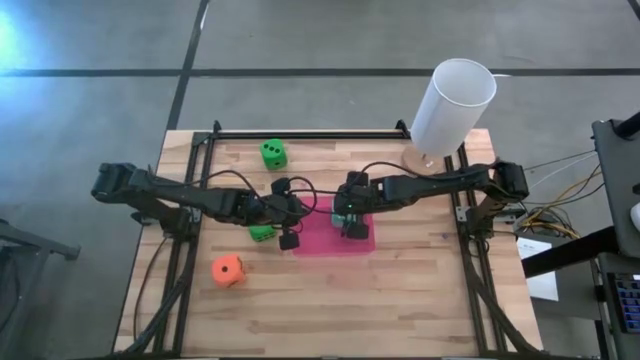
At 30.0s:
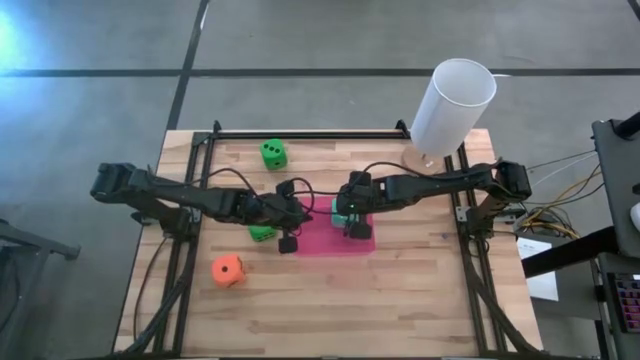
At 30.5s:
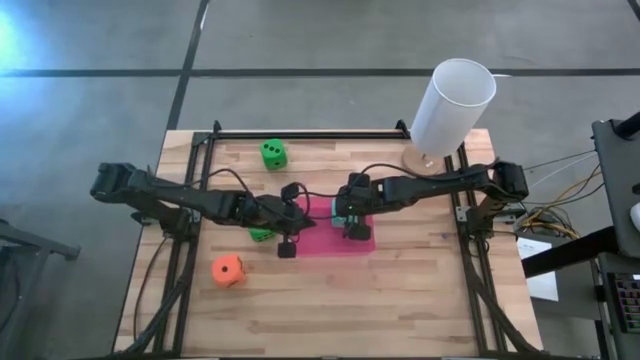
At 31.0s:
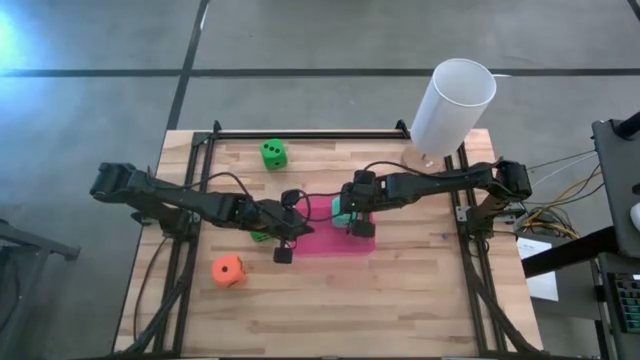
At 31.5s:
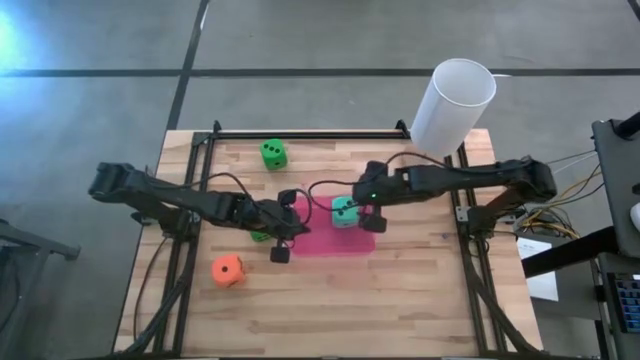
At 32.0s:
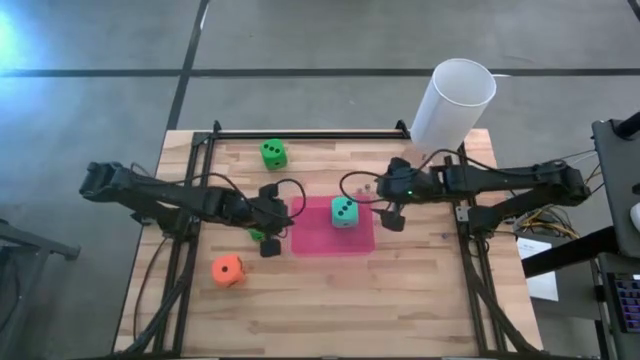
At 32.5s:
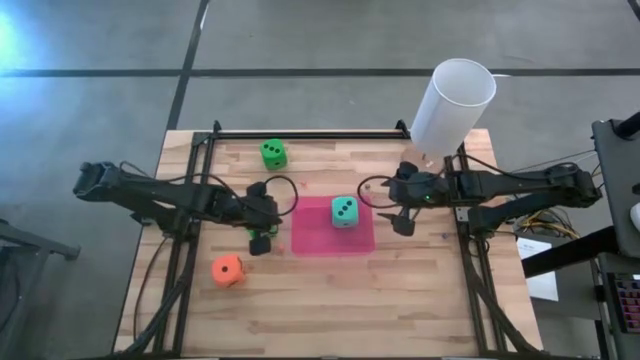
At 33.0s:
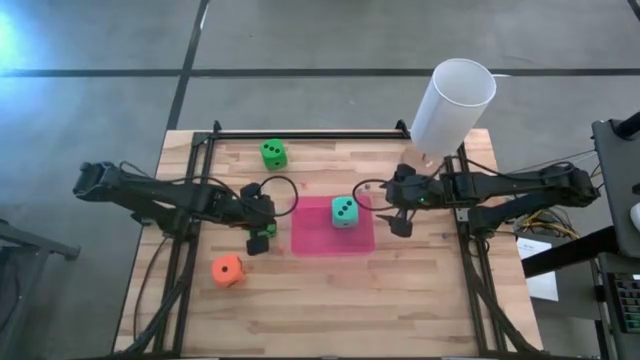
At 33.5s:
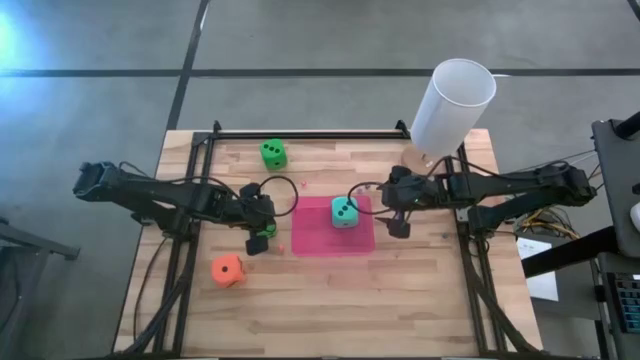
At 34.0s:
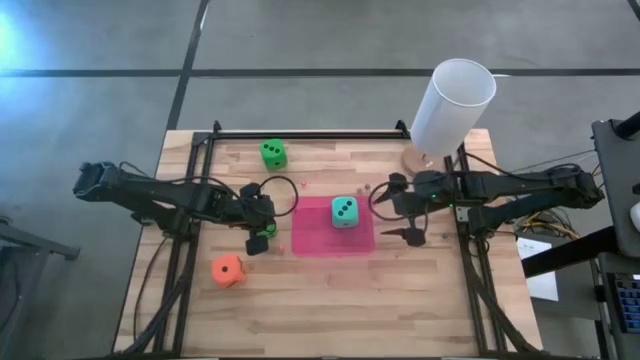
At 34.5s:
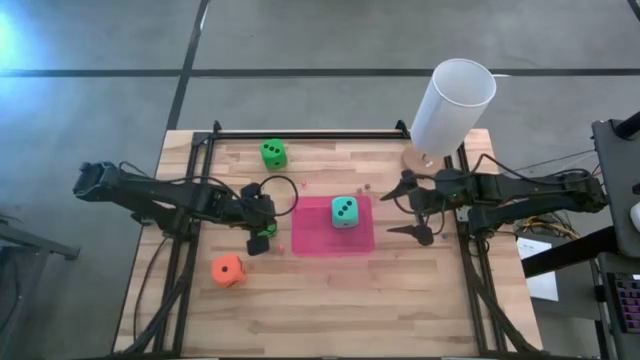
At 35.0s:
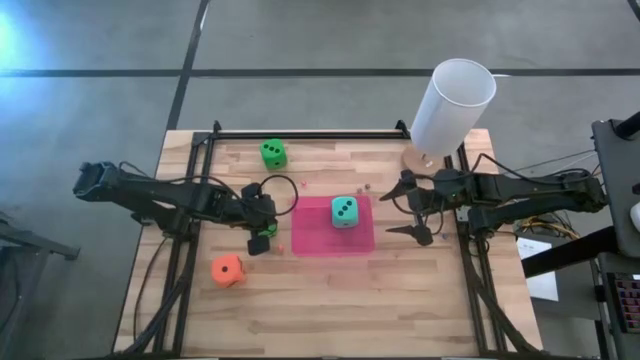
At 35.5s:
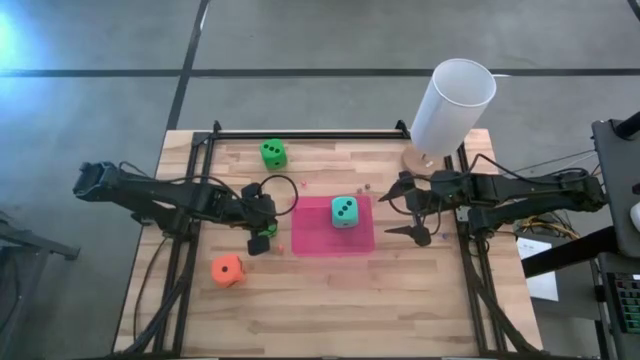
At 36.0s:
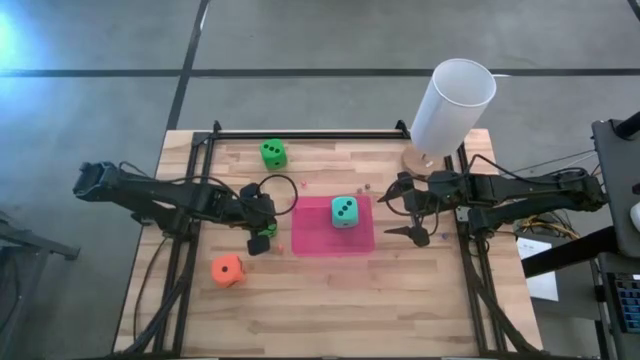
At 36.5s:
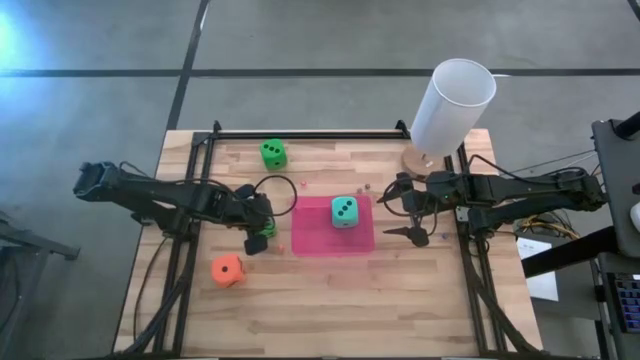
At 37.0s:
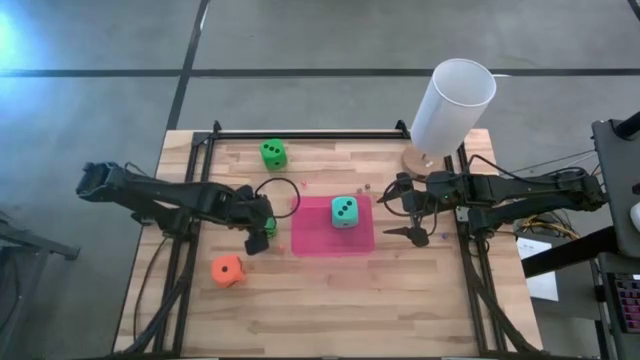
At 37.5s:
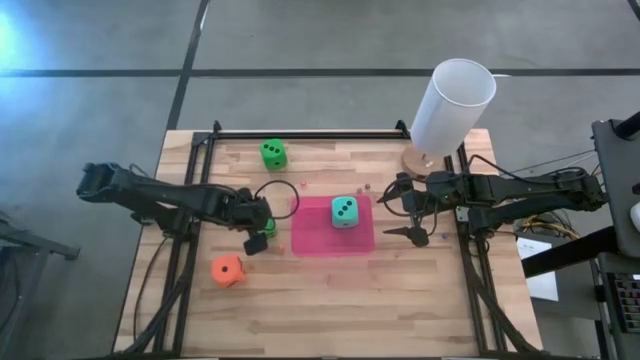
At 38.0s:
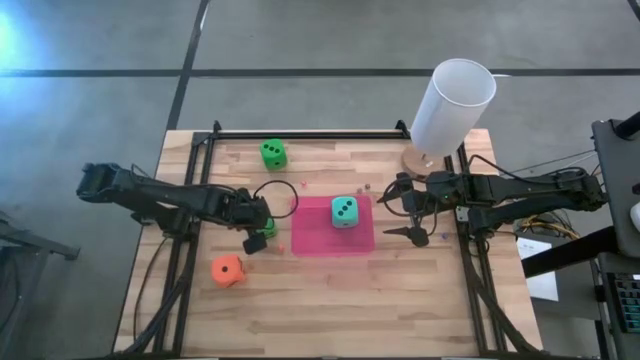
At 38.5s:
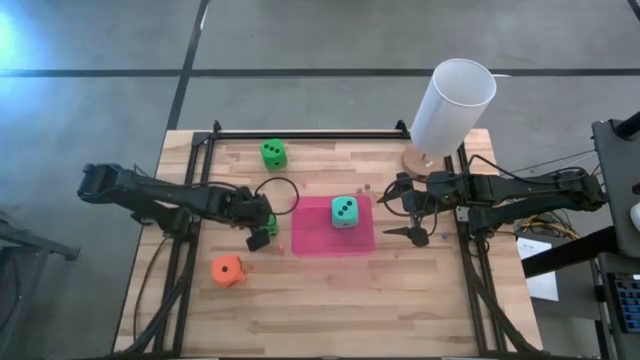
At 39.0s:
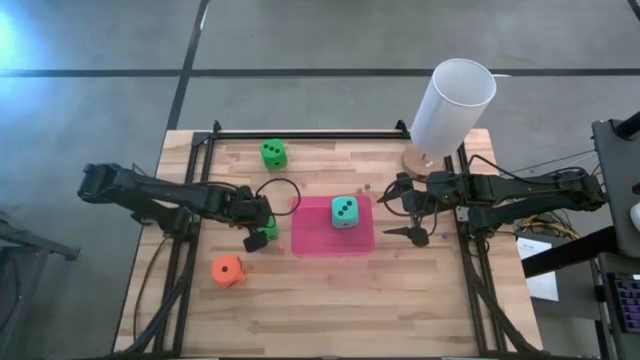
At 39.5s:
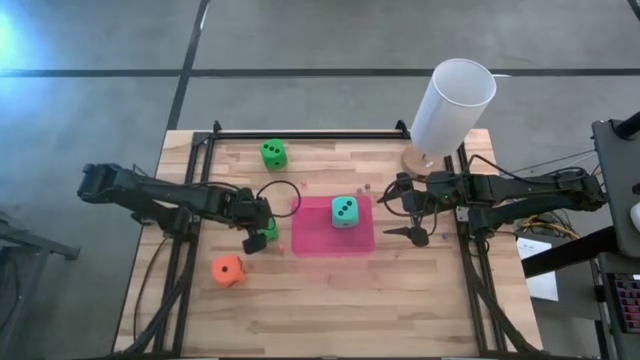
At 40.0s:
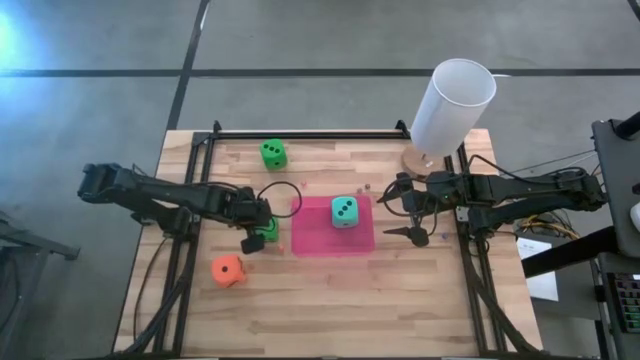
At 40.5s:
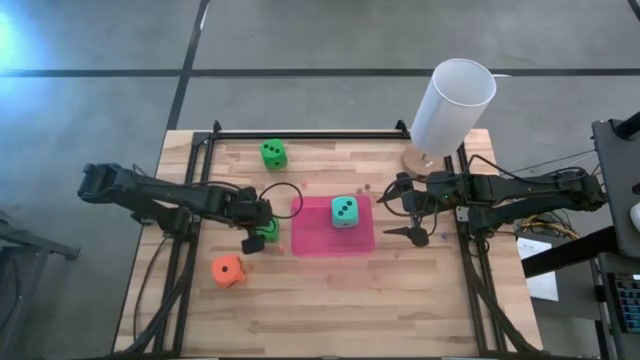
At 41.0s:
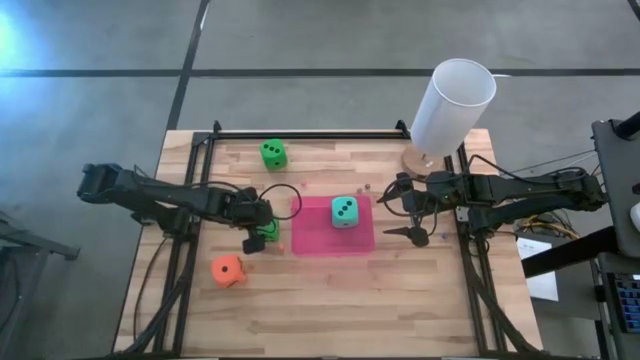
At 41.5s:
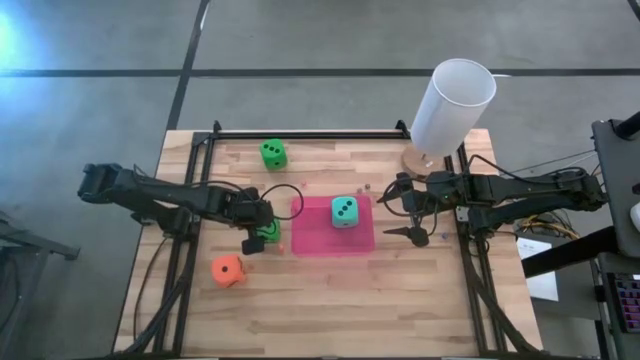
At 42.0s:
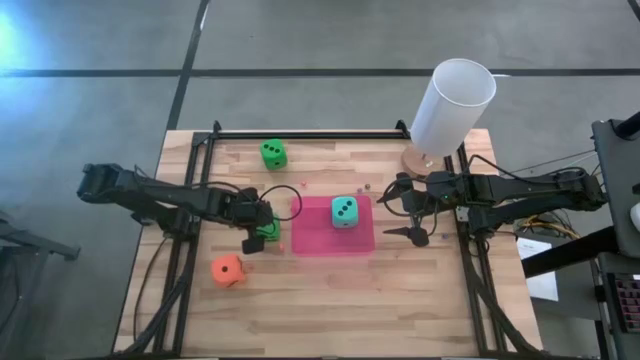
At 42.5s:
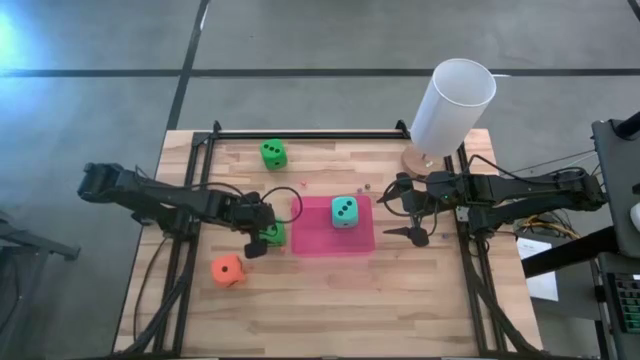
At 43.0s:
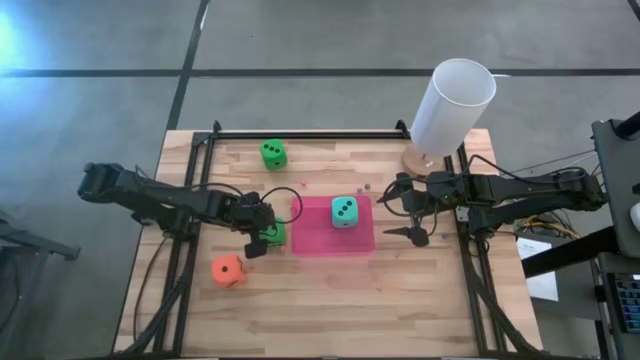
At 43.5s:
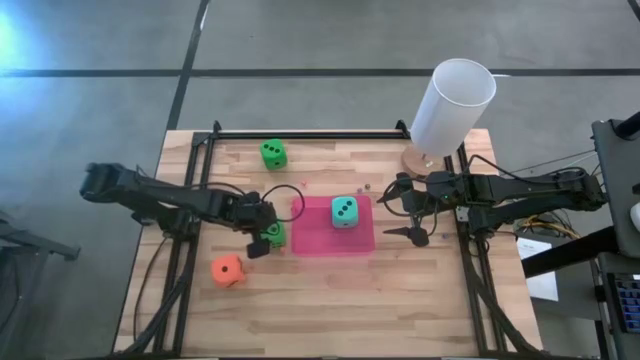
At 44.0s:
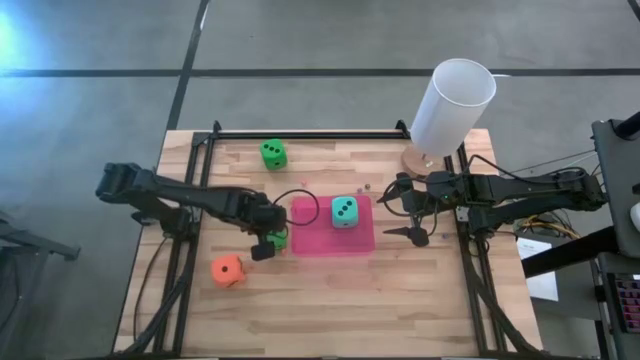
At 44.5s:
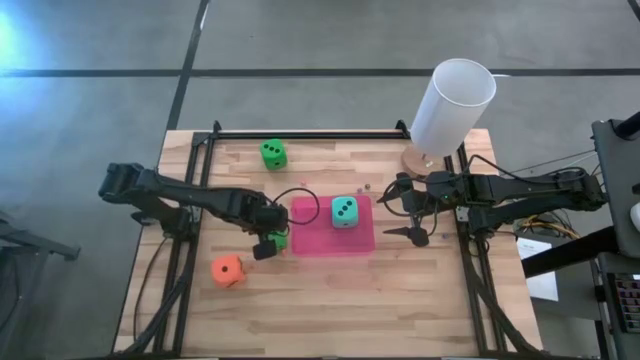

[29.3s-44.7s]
Task: Pick & Place Dice
Put the bottom large green die into the pink bin

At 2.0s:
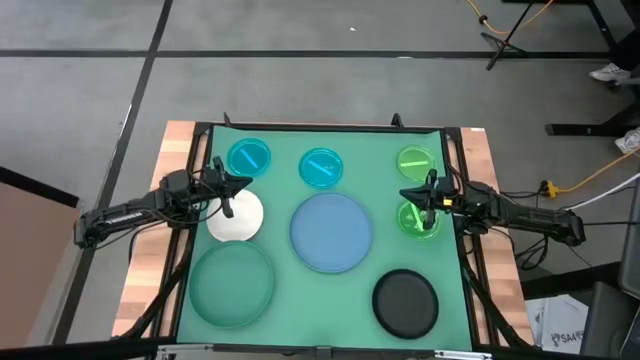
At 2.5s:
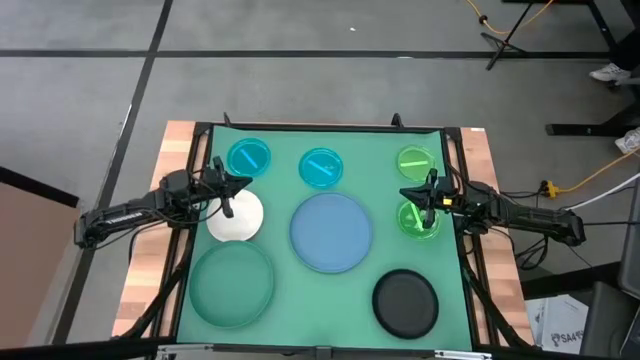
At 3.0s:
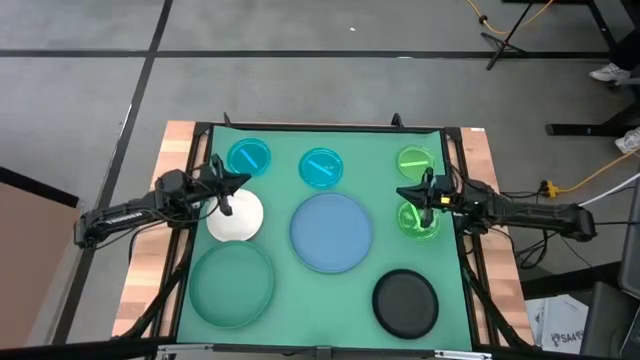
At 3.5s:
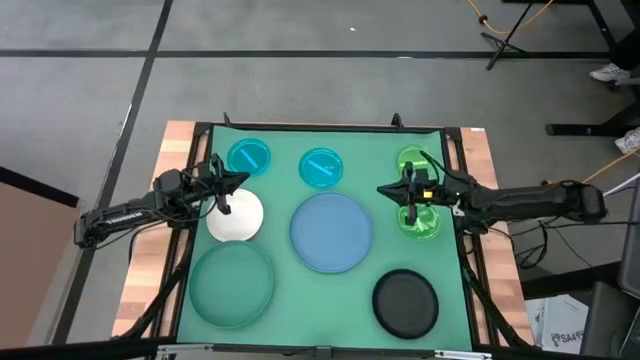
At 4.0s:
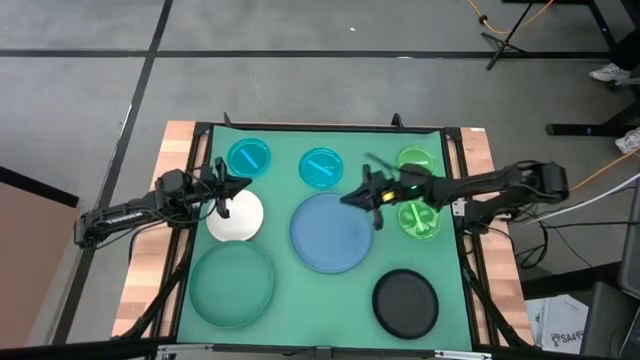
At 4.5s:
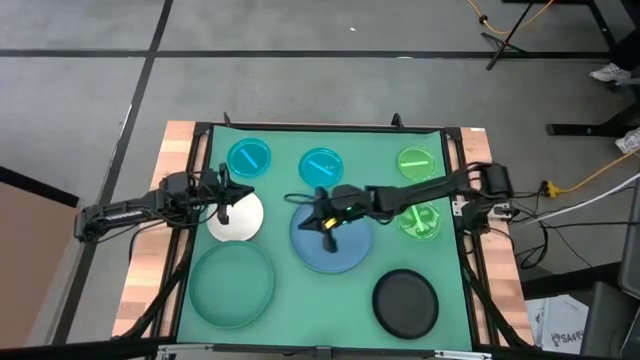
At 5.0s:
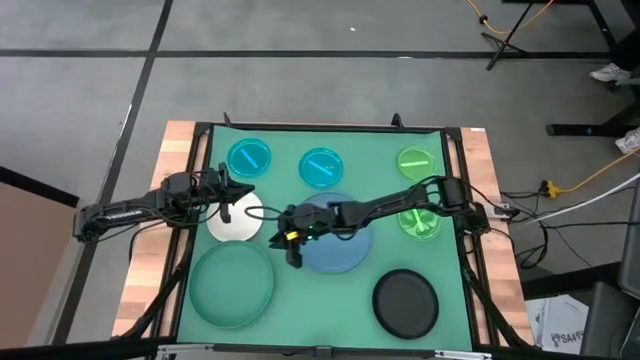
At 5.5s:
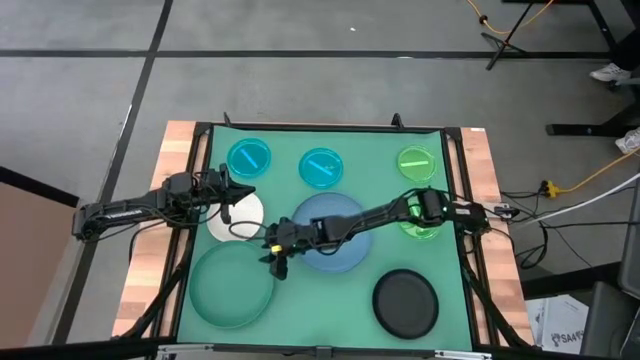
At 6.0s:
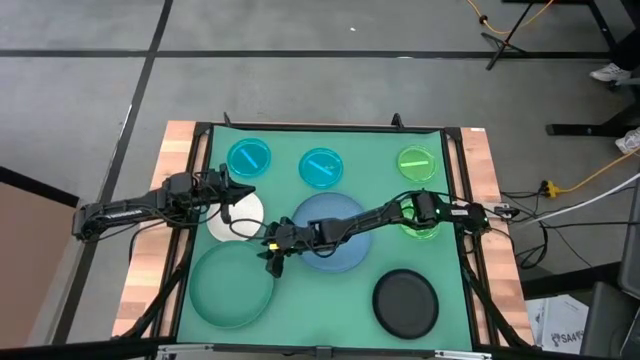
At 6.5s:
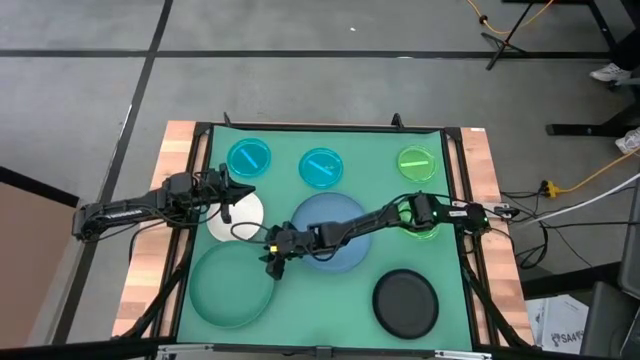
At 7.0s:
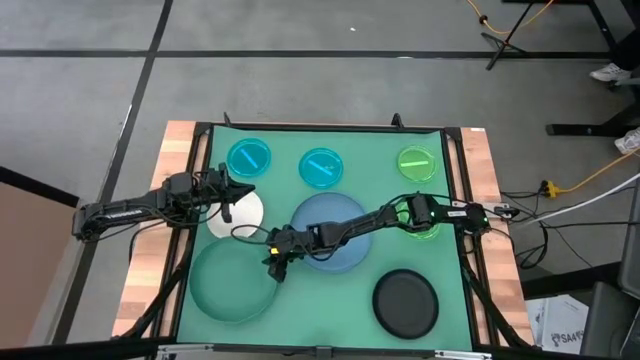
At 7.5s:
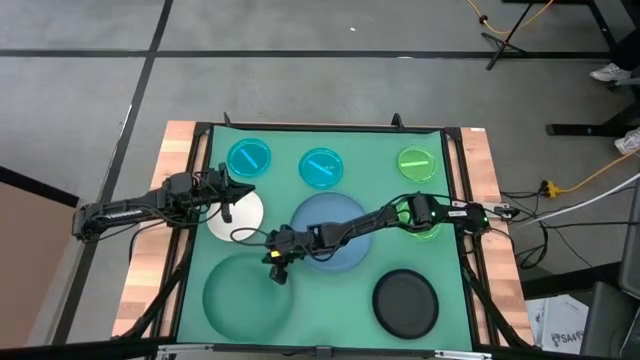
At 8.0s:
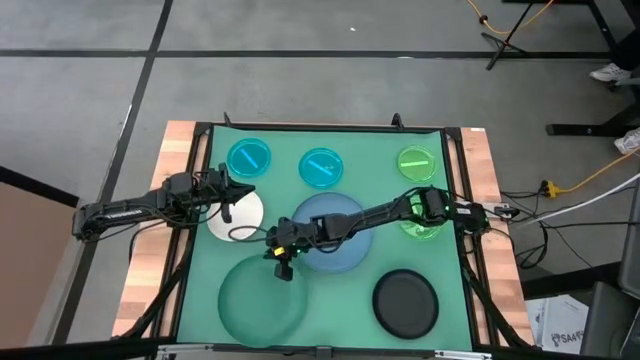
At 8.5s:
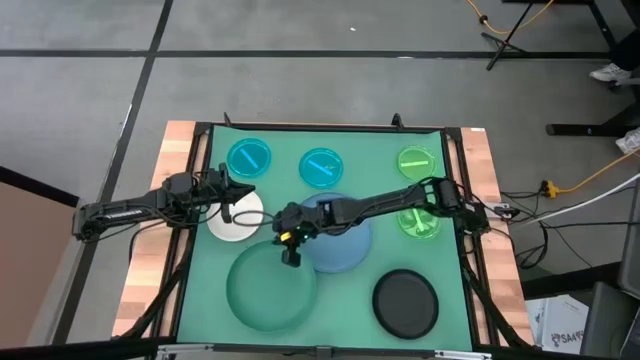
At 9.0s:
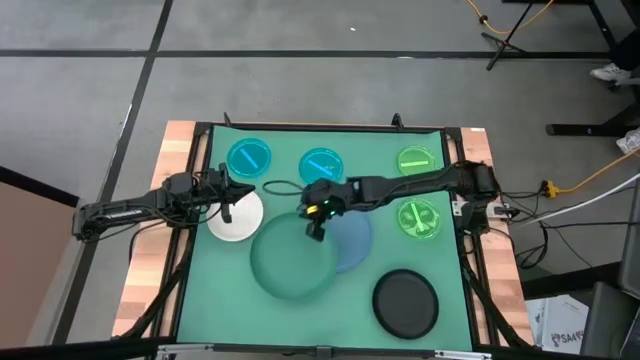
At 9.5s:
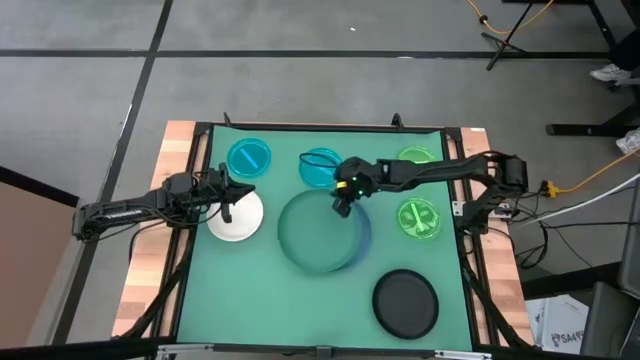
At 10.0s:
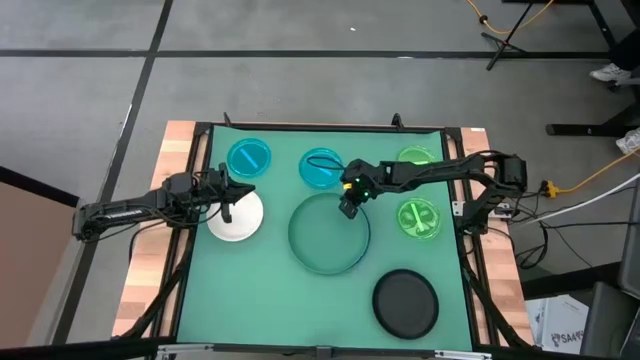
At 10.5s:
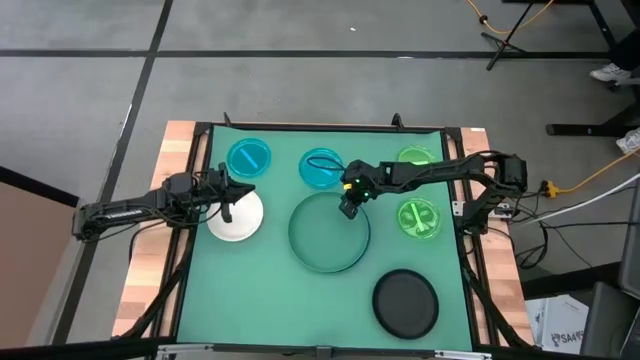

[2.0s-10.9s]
Task: Stack plastic plates
Stack the green plate on top of the blue plate
